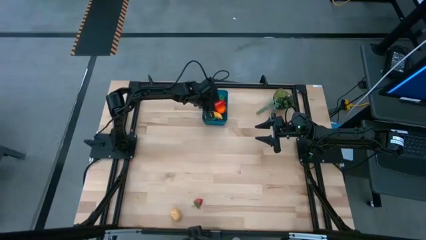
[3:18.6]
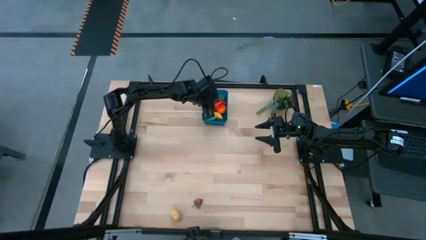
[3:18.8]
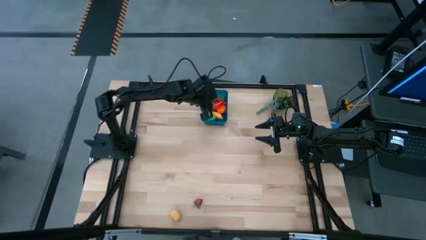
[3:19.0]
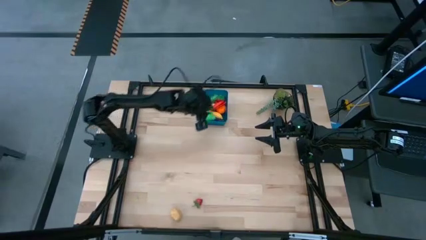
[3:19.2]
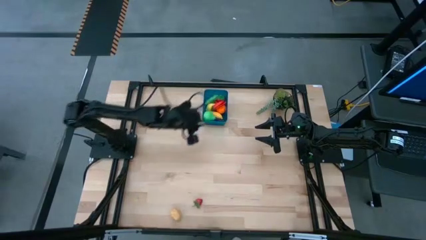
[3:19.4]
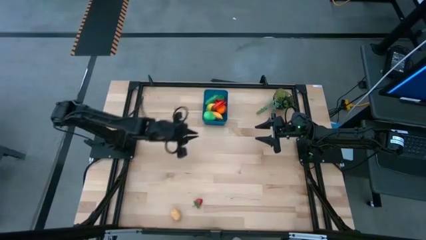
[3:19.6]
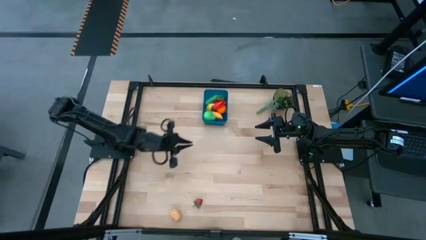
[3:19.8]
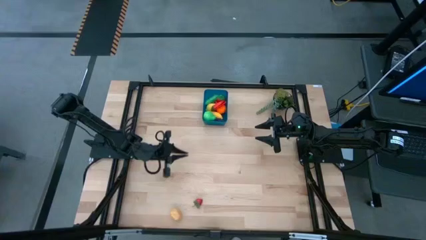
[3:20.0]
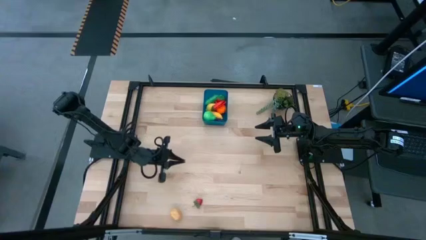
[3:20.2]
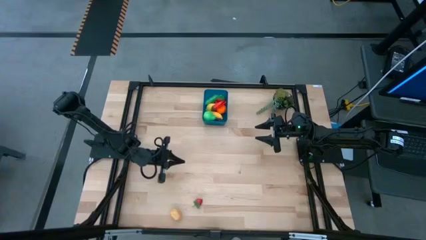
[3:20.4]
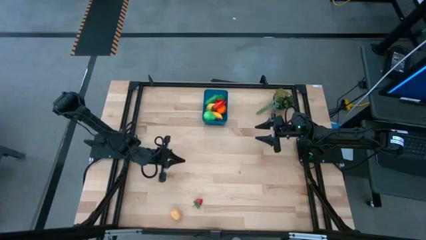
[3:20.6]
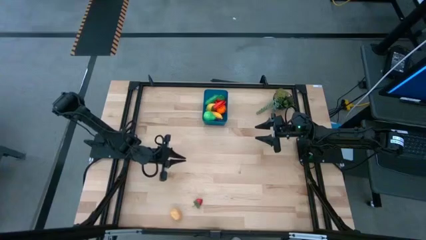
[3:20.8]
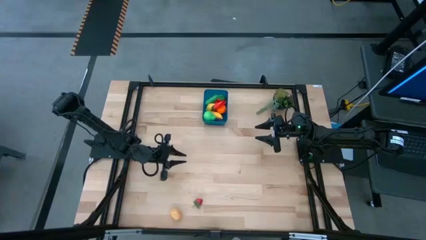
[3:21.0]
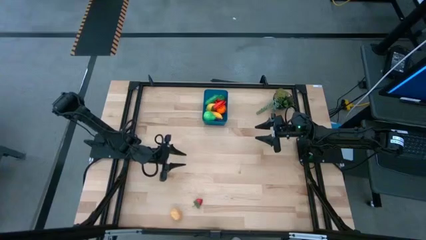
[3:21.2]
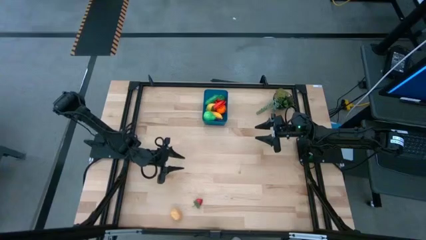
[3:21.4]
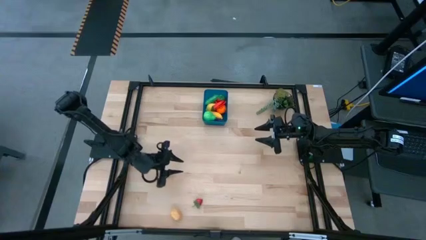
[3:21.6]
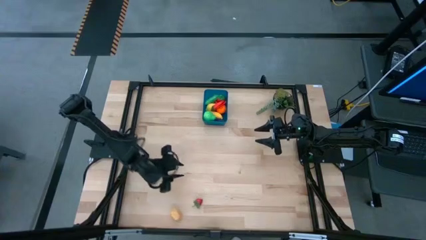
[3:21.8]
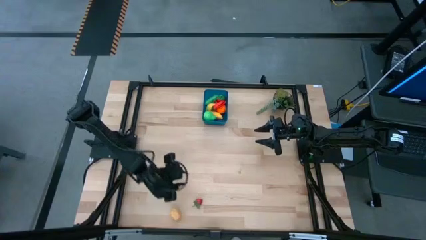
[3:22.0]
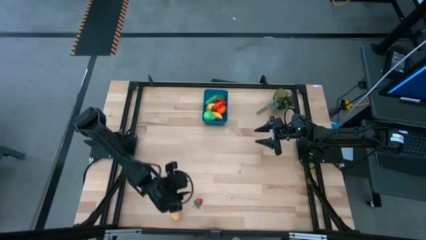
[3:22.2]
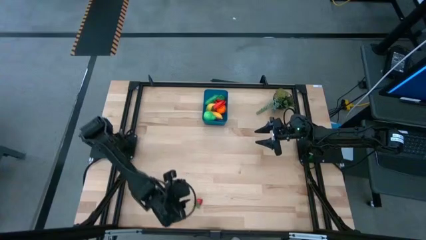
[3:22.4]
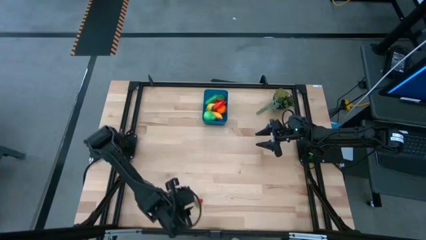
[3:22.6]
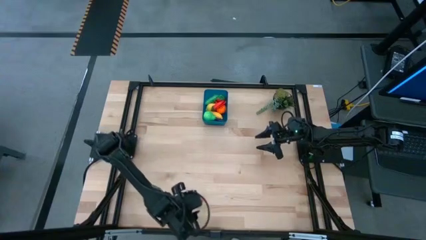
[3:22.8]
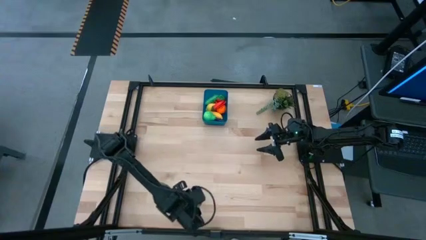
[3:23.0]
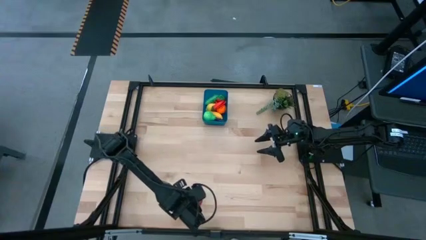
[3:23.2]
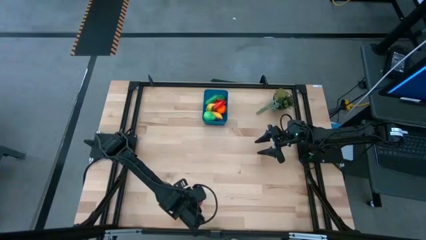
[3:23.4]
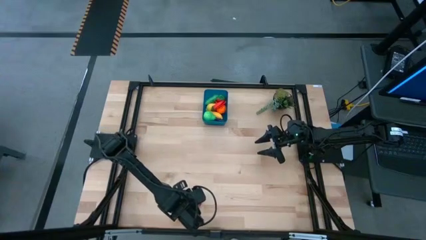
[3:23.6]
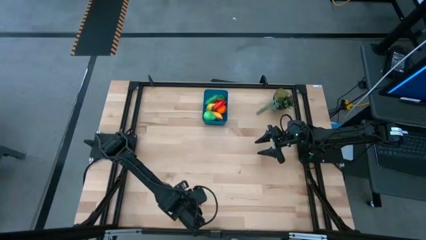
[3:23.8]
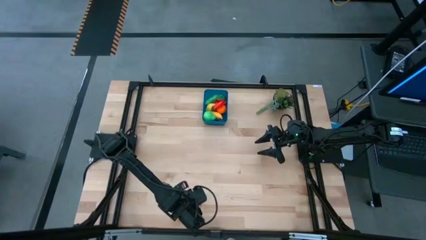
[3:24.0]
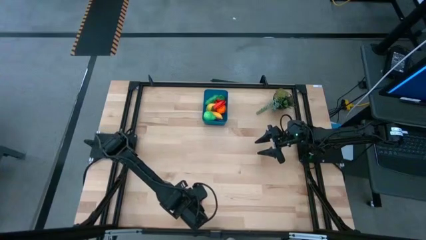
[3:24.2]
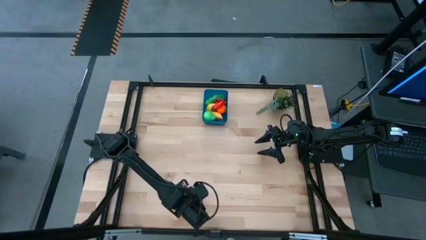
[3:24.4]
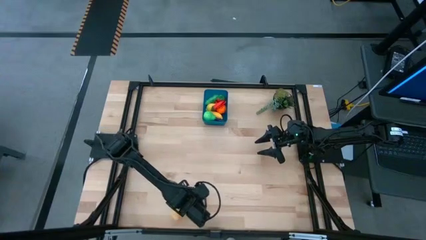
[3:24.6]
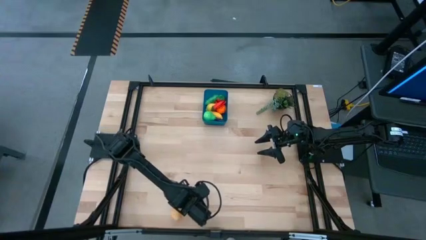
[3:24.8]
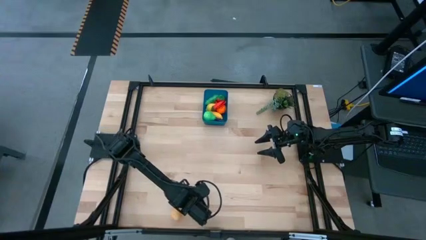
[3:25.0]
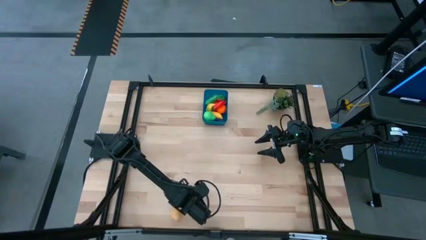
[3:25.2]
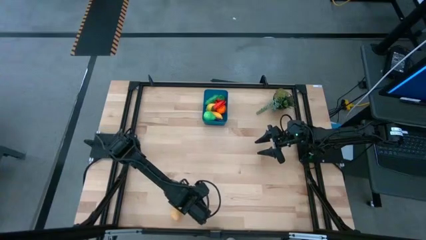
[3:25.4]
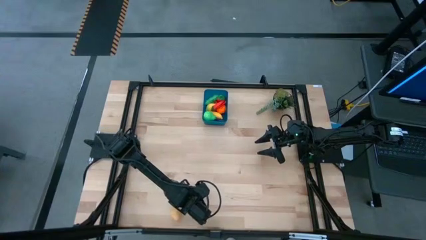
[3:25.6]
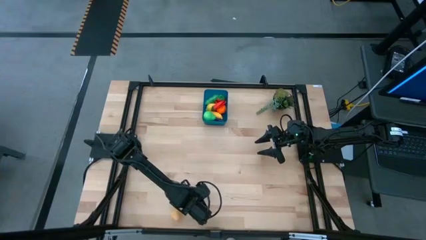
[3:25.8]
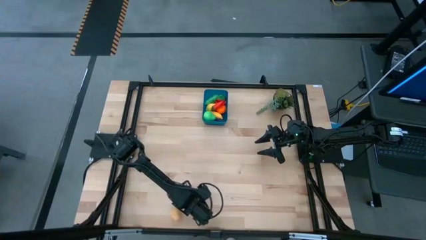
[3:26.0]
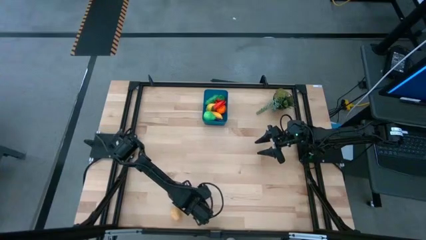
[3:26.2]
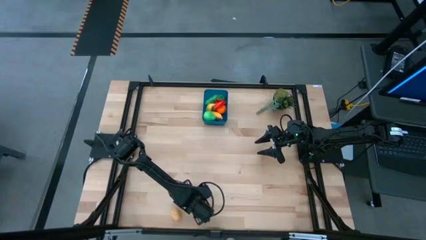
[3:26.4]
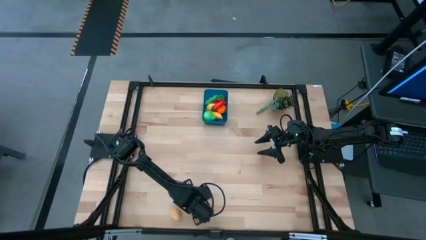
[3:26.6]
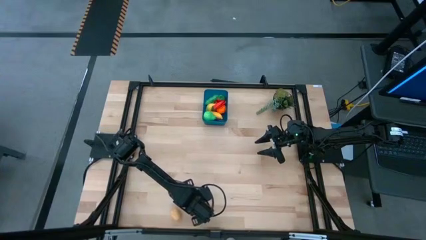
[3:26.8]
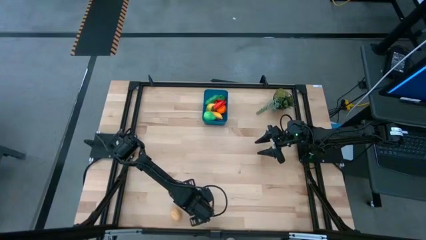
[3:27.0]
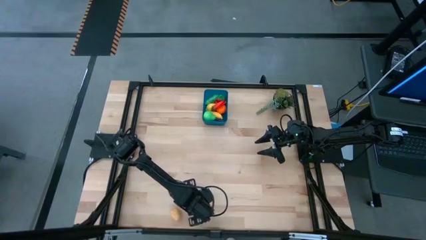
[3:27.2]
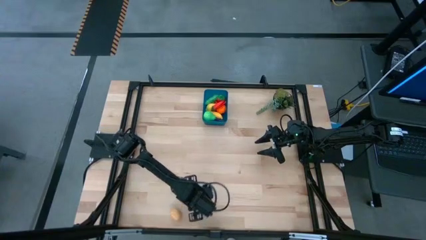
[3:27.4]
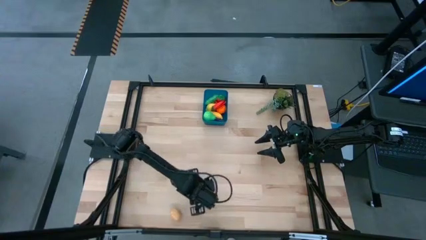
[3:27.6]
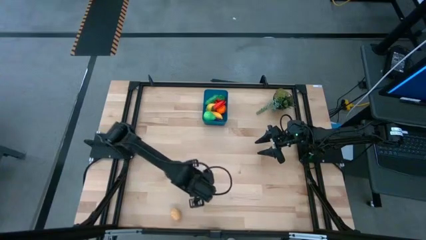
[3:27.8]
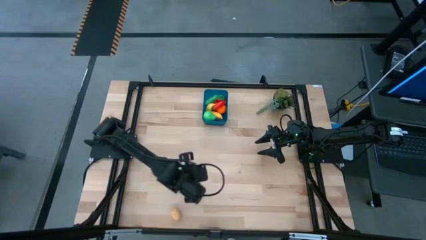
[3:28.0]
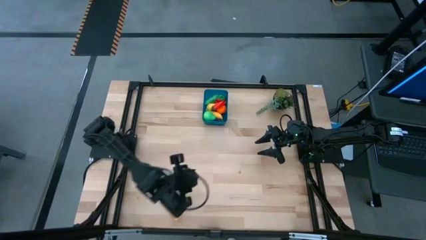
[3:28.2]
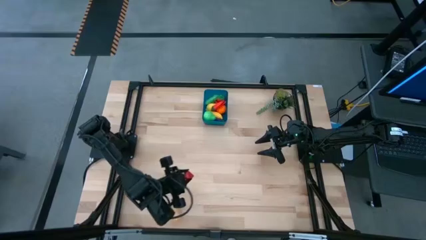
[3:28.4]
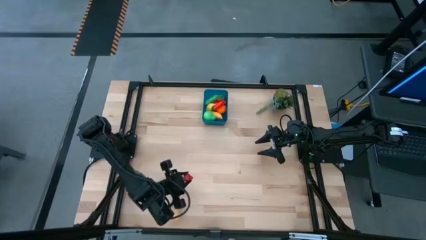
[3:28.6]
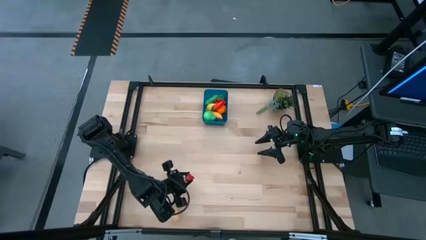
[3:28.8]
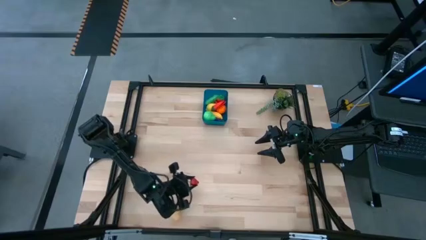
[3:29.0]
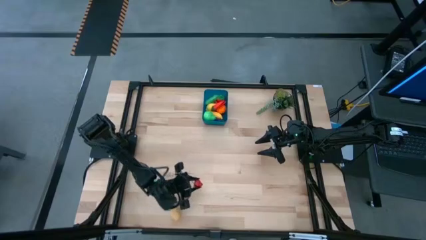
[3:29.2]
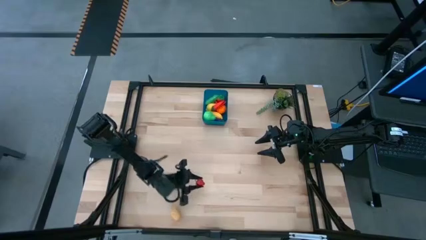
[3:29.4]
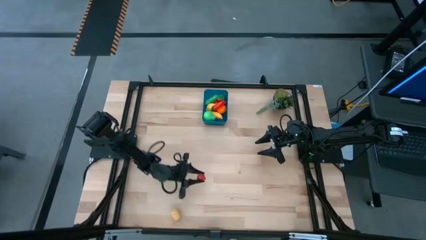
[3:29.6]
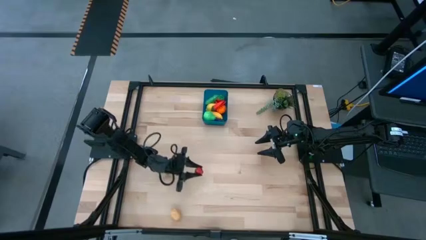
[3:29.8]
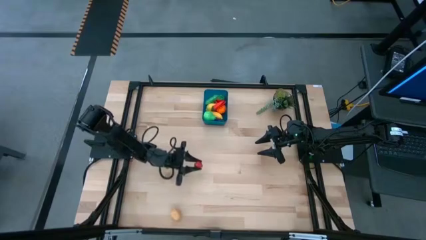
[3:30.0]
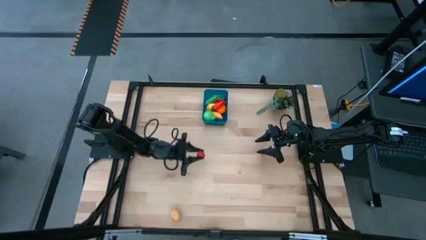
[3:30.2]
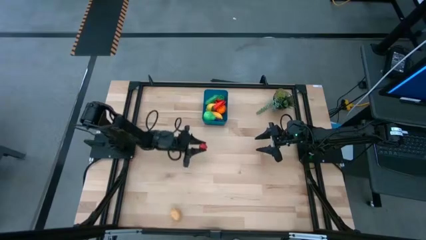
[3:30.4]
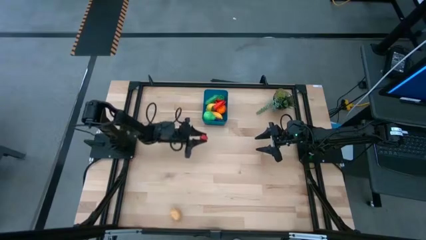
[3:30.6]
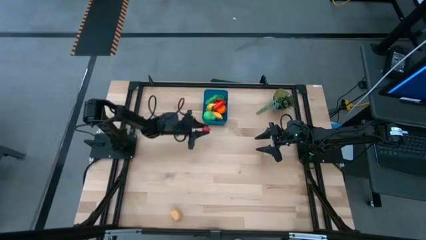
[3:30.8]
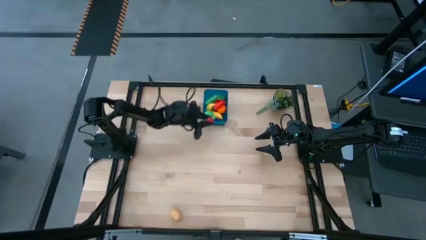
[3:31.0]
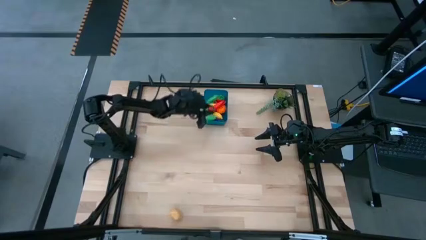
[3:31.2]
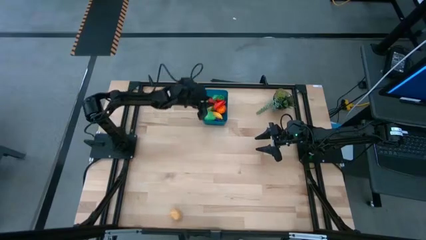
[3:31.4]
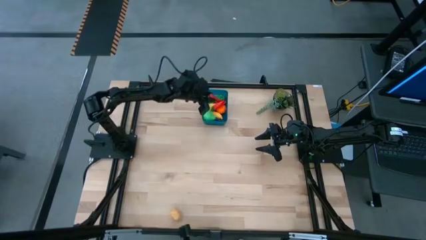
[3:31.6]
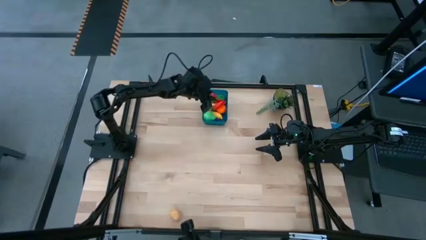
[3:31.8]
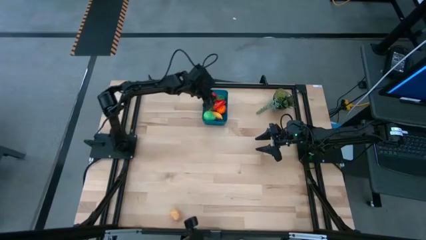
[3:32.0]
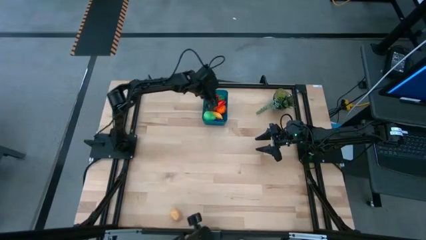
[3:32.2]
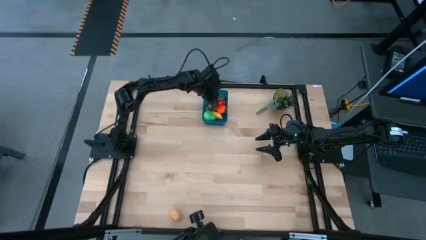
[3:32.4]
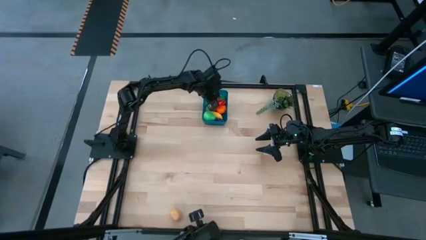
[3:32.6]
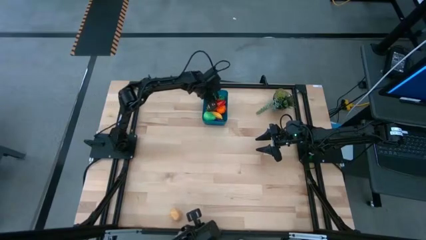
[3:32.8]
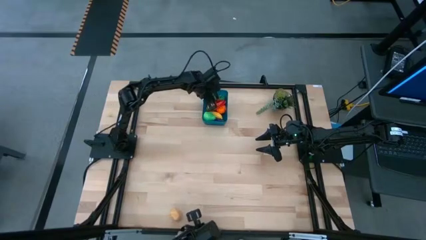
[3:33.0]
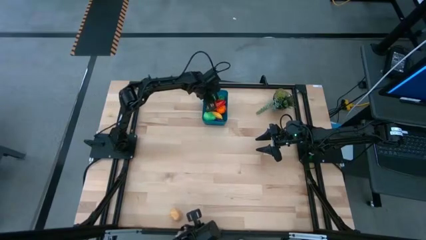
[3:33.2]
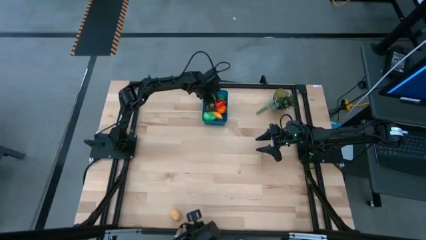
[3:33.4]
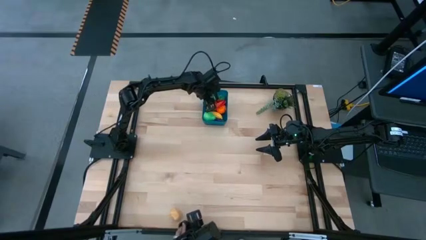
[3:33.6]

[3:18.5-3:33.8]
Task: Pick and placing Produce into tupperware
Put the strawberry into the blue bin

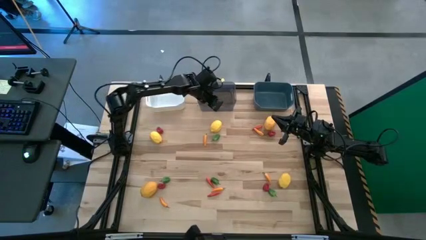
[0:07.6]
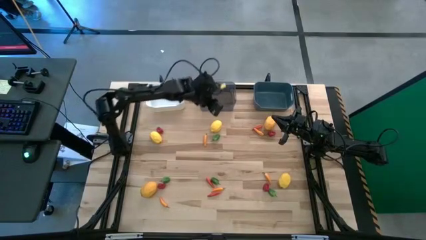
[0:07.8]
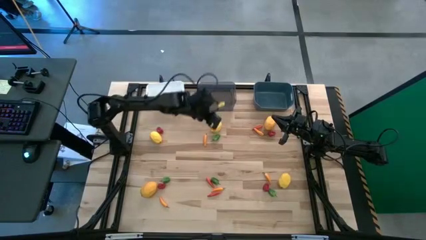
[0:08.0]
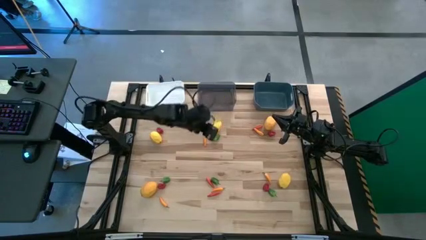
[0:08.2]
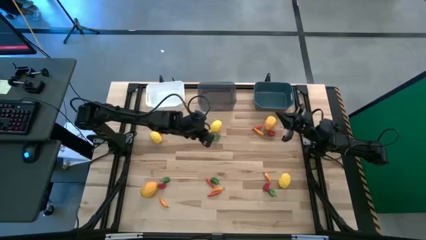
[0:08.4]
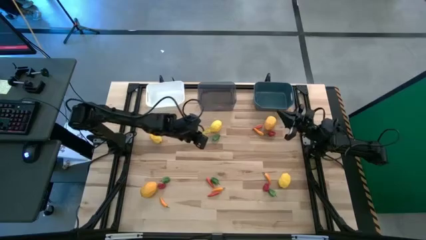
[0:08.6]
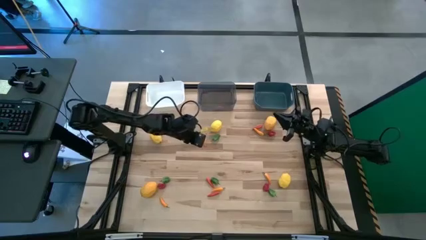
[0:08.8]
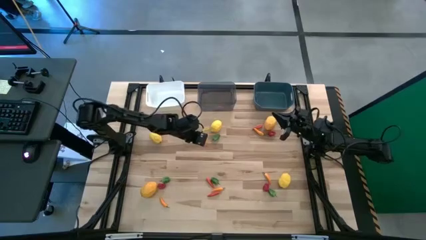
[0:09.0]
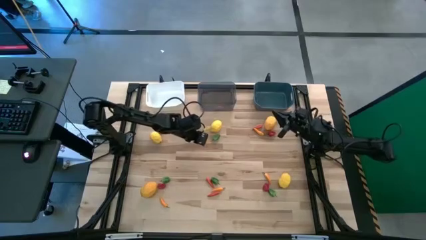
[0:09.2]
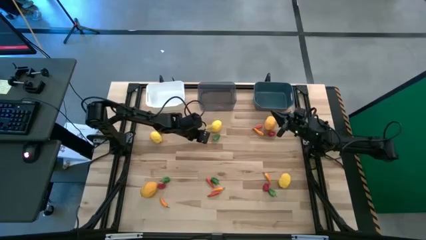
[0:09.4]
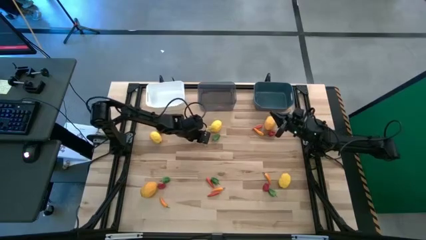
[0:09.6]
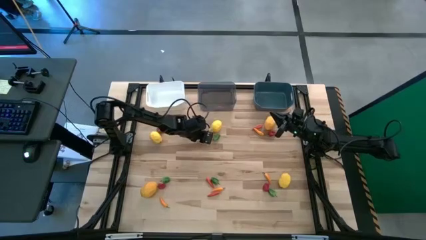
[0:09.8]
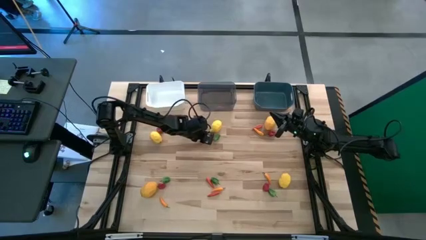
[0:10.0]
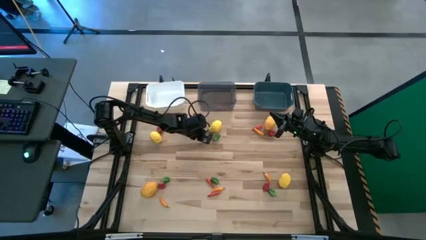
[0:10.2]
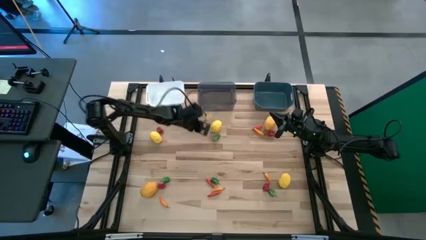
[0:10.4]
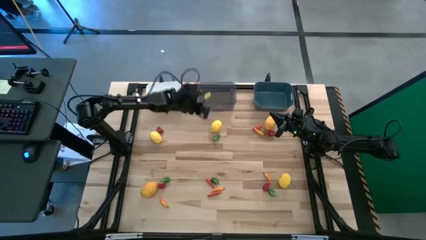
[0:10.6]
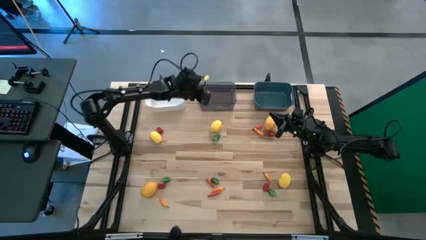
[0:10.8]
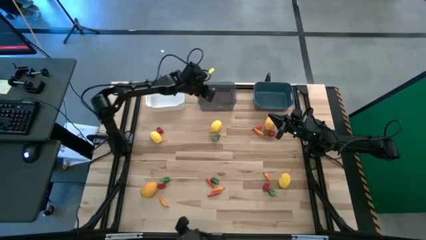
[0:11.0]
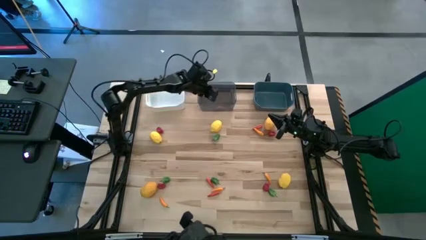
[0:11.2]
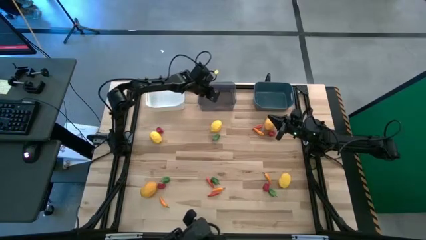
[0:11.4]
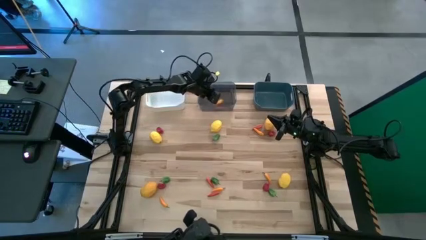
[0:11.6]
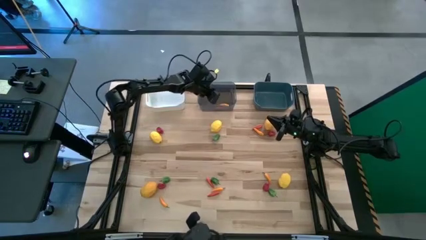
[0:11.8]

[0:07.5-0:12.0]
Task: Sort produce into baskets
Put the top left yellow chili pepper into the black bin
